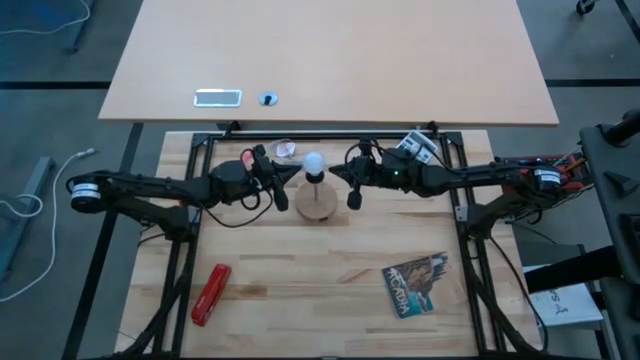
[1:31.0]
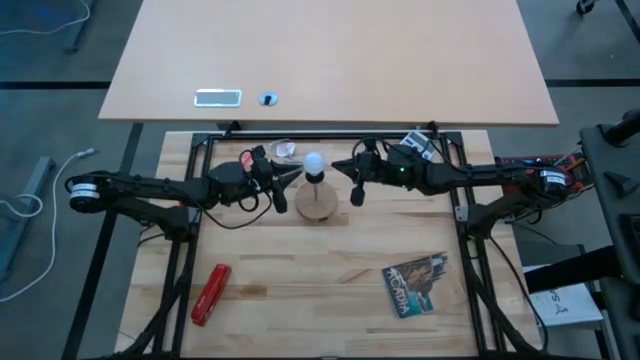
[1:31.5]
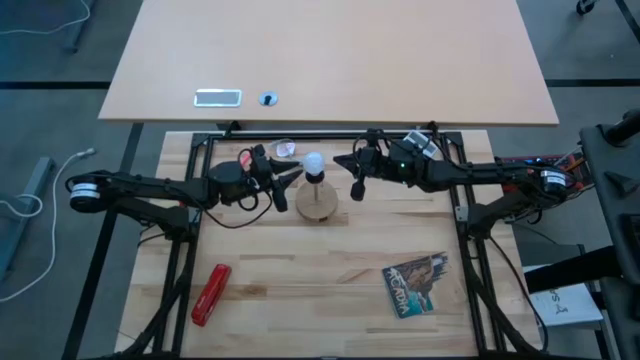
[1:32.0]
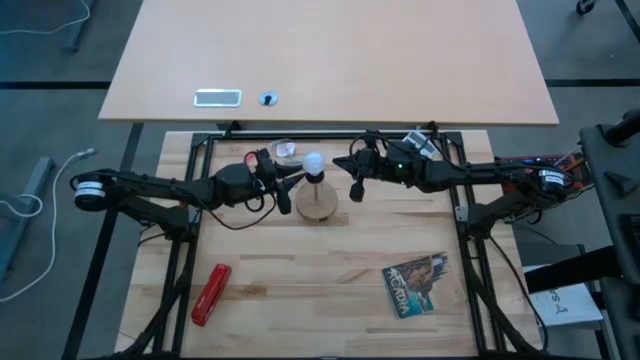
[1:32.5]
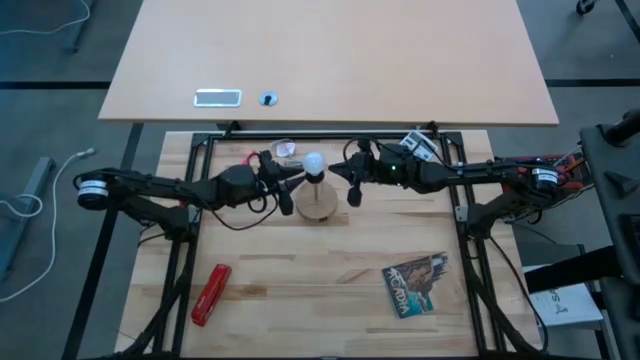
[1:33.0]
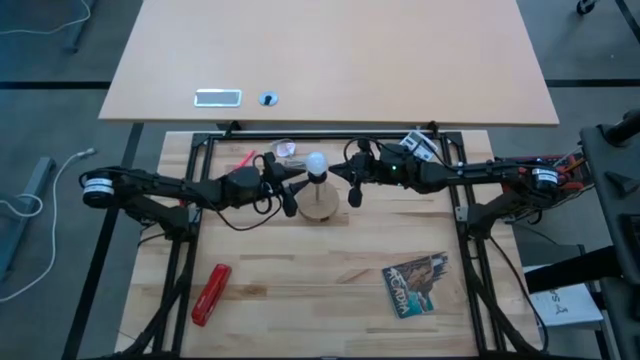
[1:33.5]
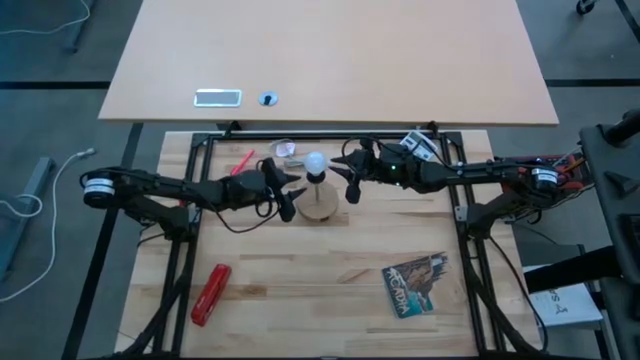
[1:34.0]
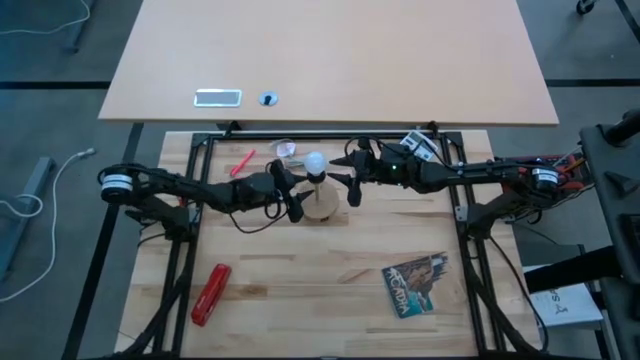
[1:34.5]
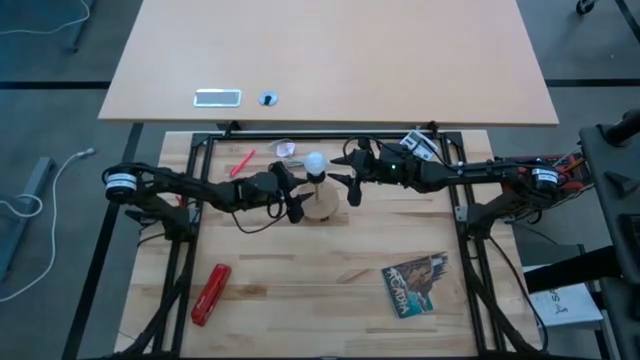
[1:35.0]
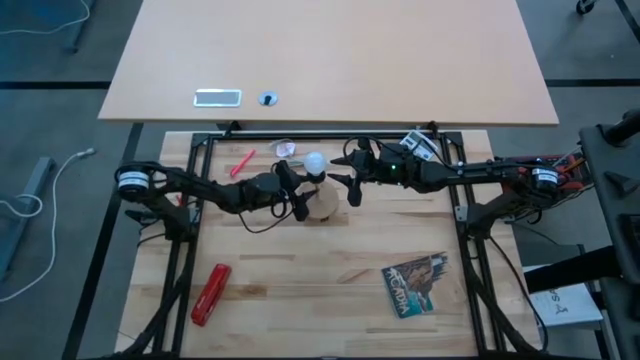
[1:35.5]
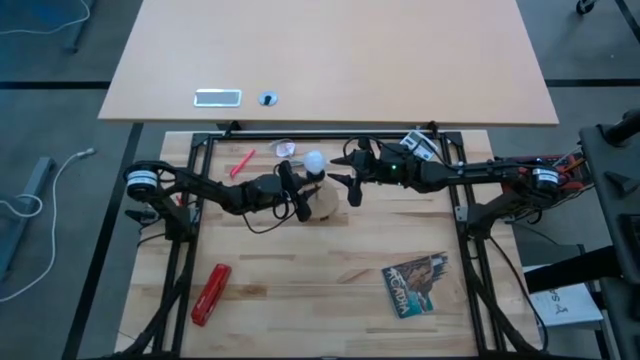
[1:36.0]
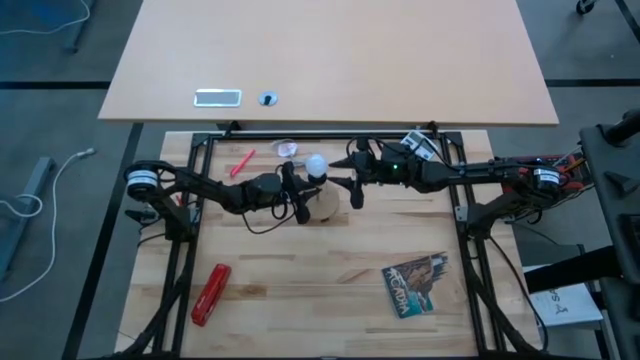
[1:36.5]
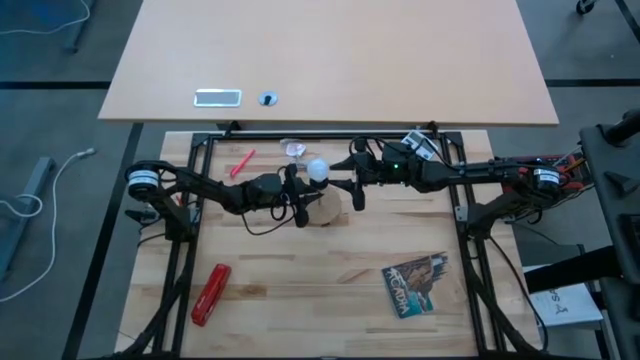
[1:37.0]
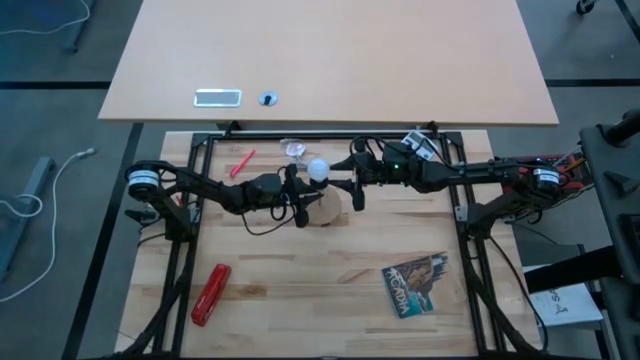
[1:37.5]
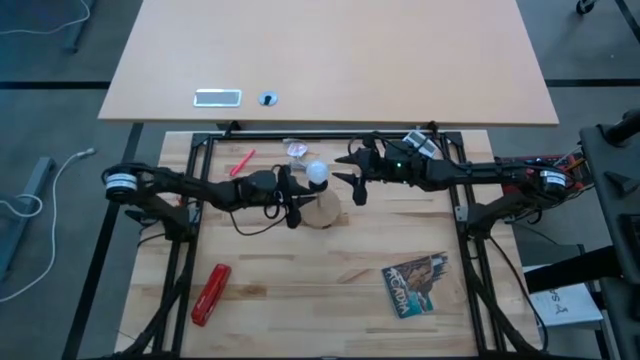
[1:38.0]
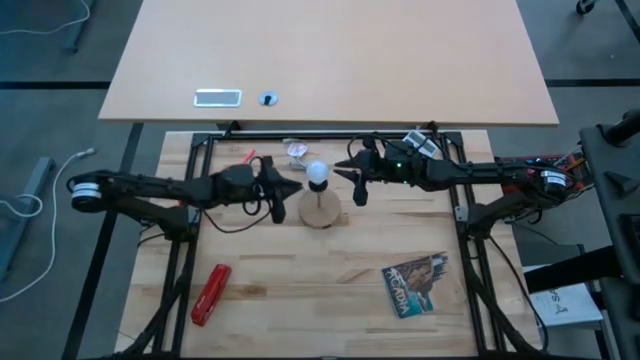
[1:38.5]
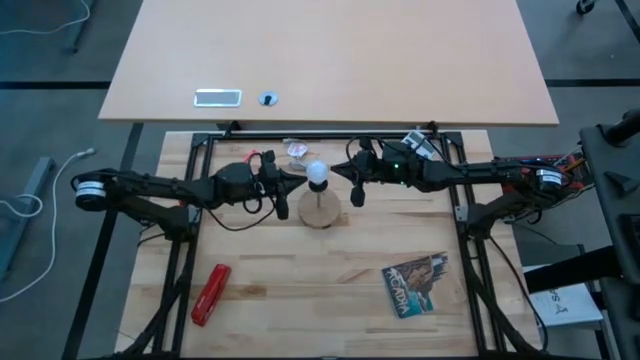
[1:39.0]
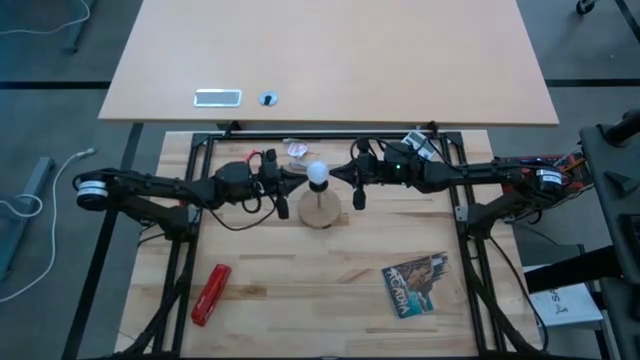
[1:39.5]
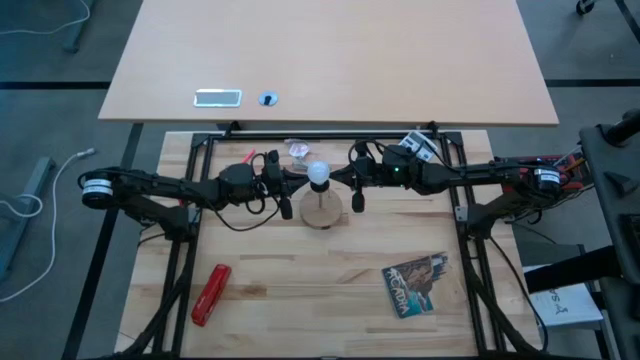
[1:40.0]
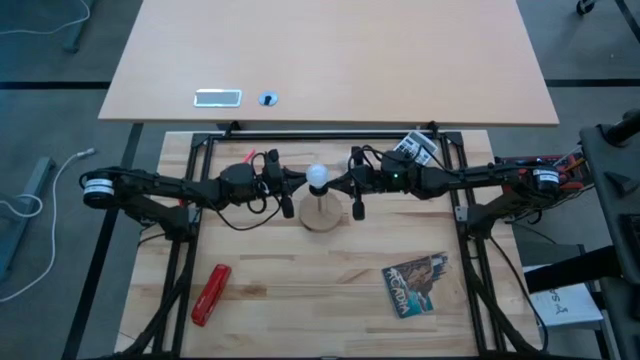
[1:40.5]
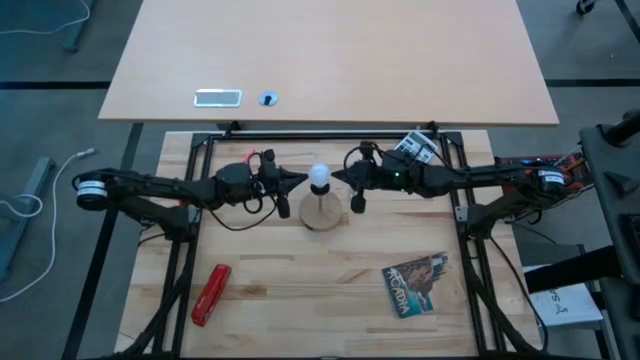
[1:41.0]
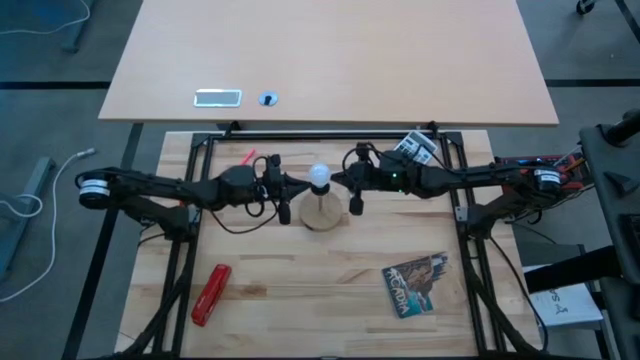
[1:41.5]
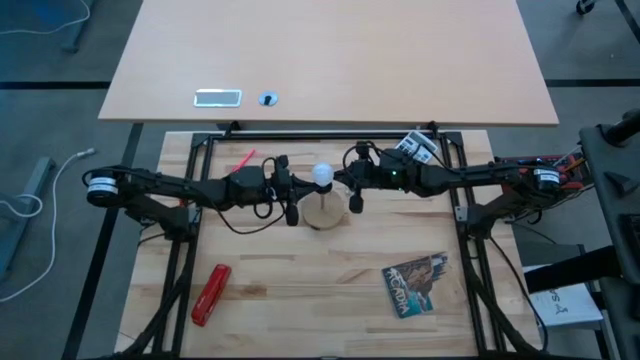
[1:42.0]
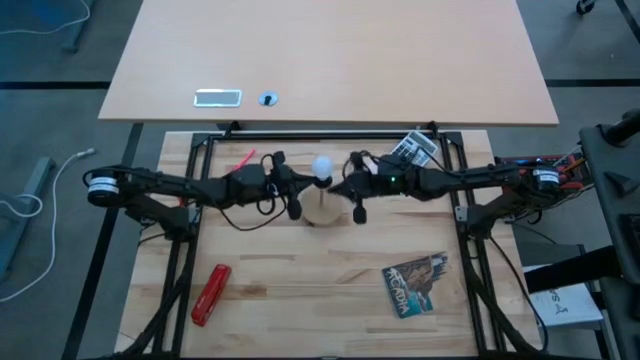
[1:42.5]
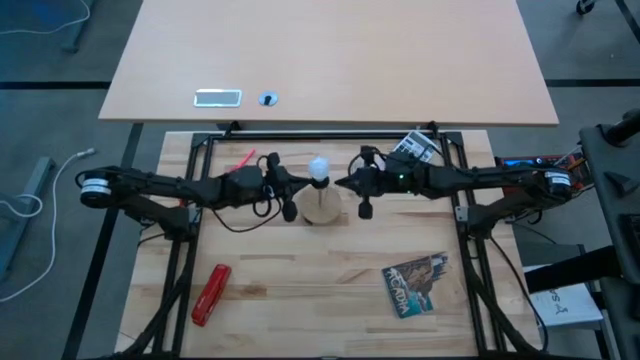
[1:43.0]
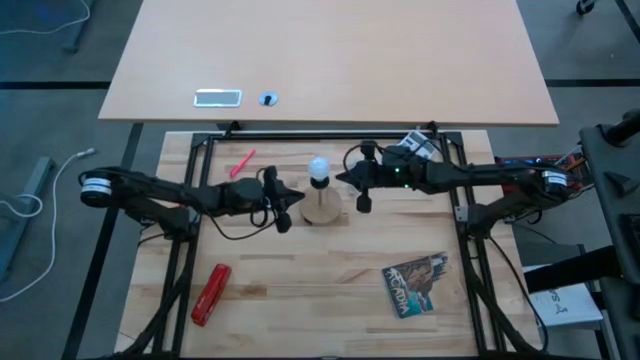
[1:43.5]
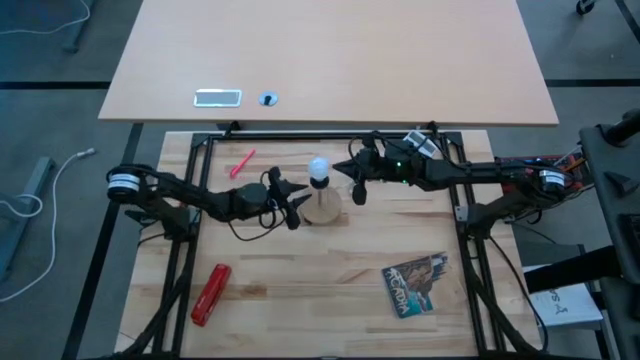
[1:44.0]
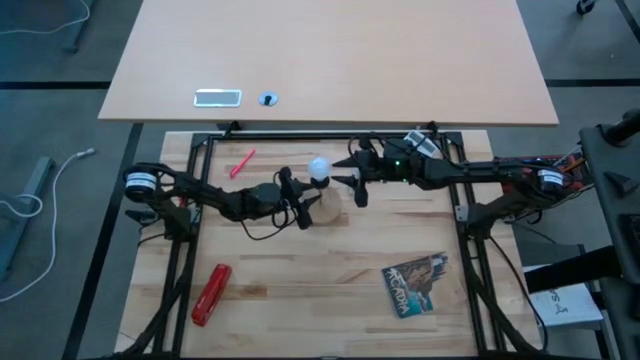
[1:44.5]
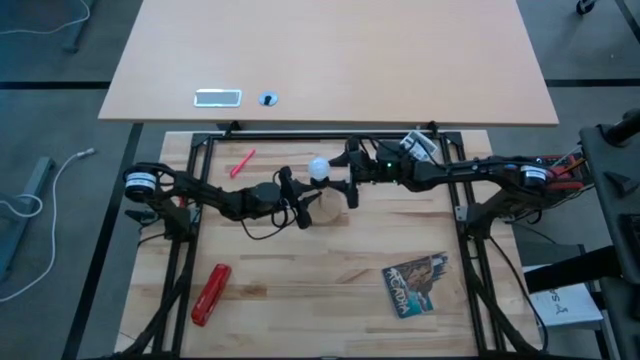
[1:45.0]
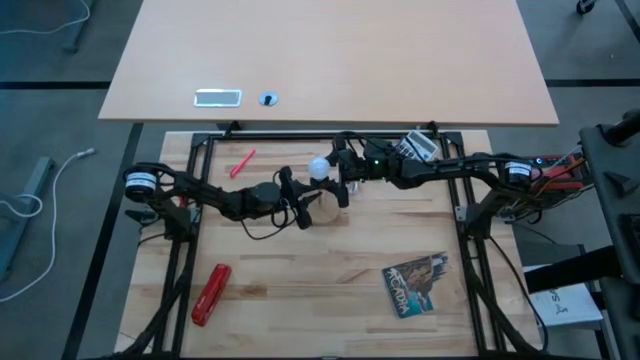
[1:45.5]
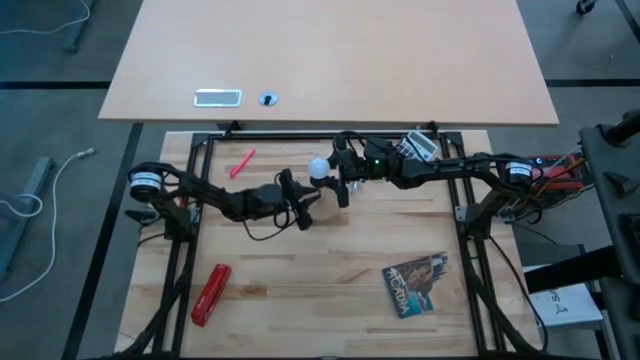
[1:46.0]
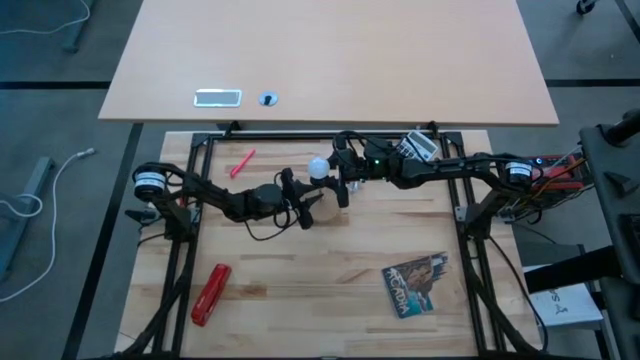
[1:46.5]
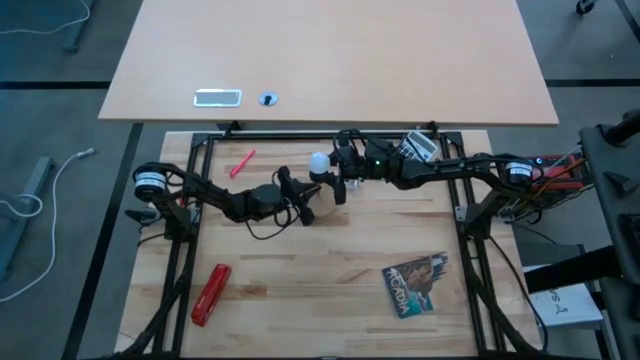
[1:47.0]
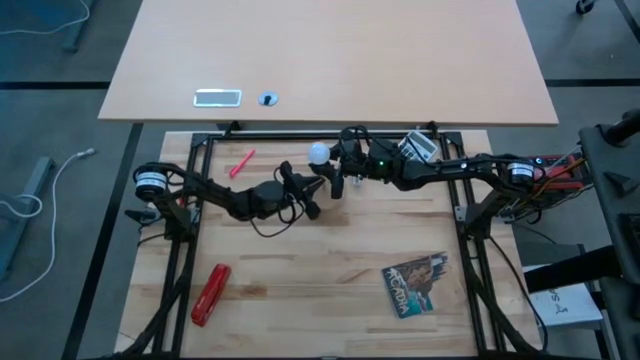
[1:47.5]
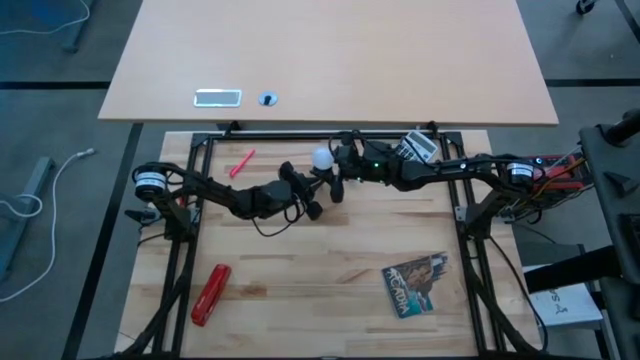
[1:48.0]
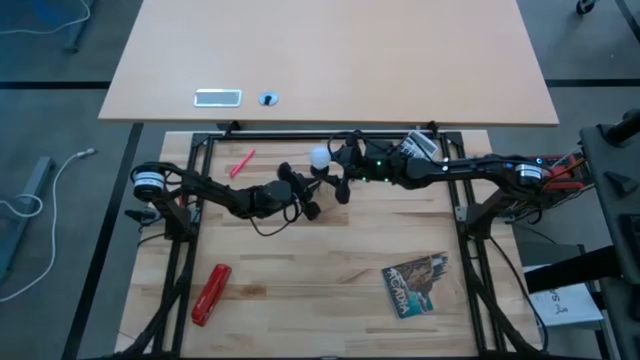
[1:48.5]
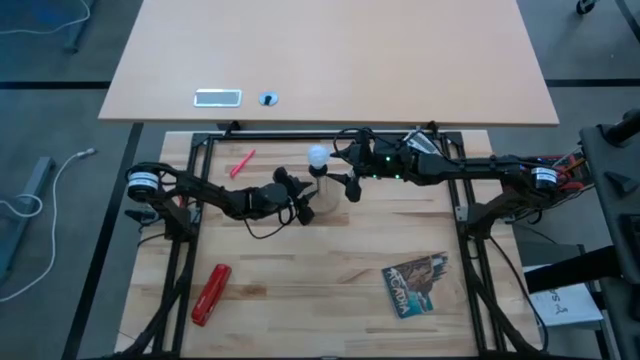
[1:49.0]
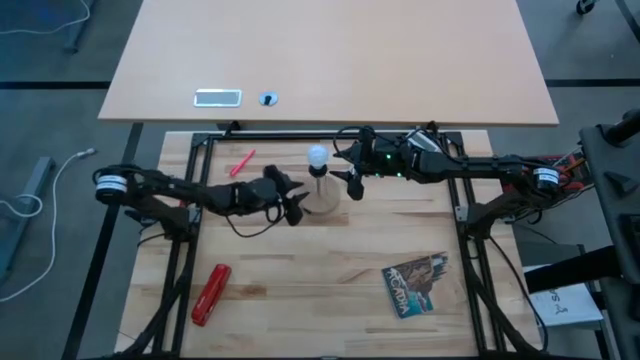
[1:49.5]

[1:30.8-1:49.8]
Task: Screw lightbulb
Insert the lightbulb into the lamp
